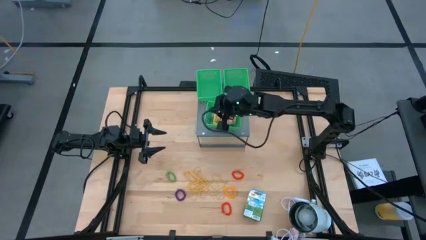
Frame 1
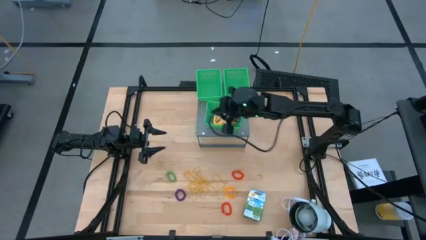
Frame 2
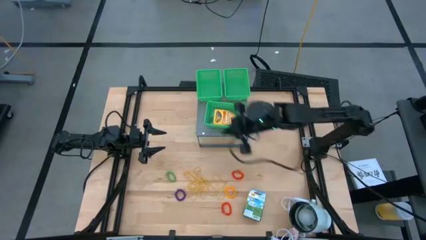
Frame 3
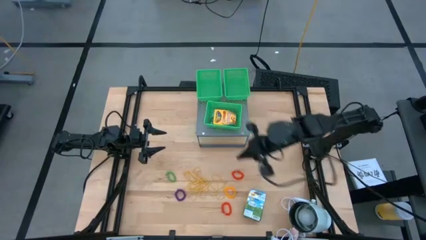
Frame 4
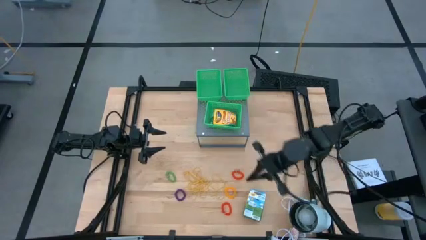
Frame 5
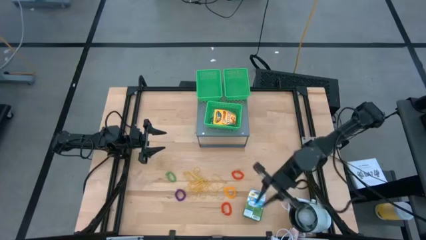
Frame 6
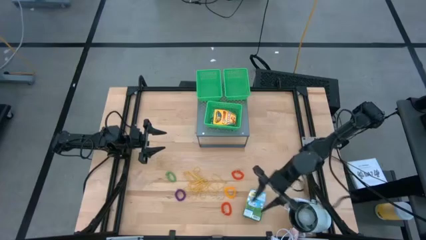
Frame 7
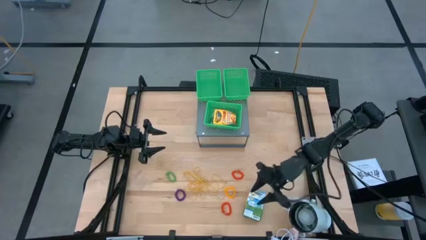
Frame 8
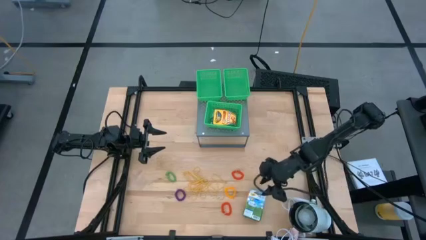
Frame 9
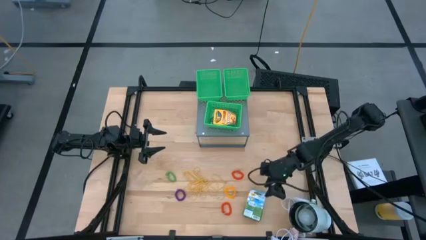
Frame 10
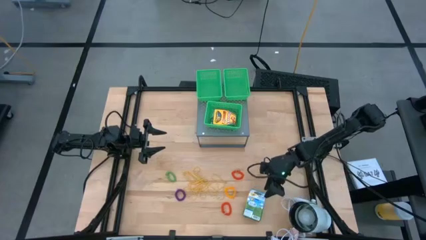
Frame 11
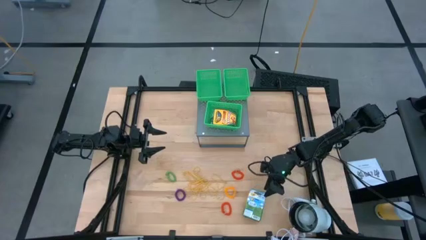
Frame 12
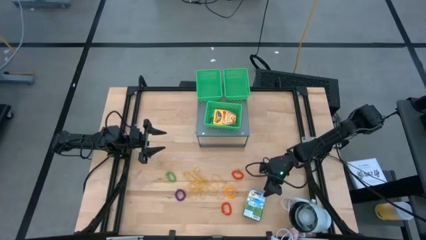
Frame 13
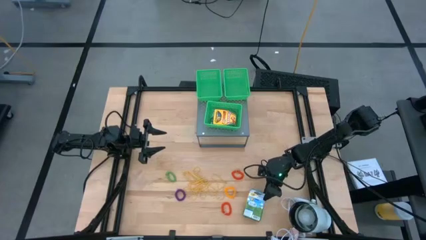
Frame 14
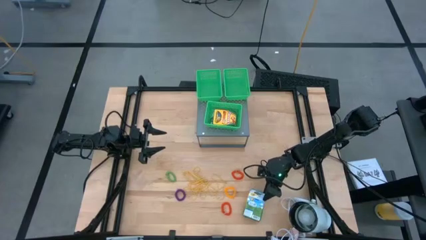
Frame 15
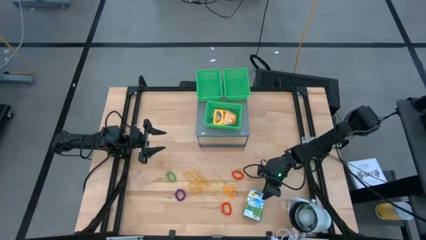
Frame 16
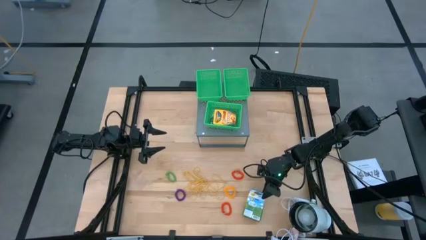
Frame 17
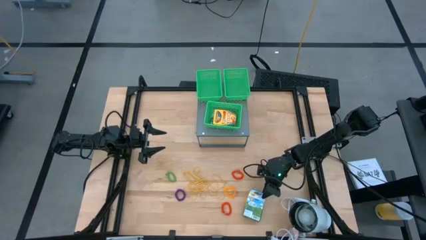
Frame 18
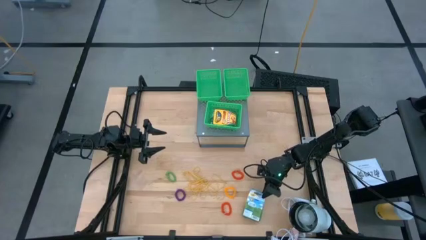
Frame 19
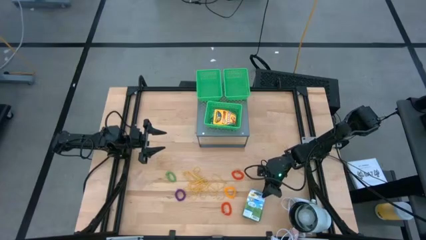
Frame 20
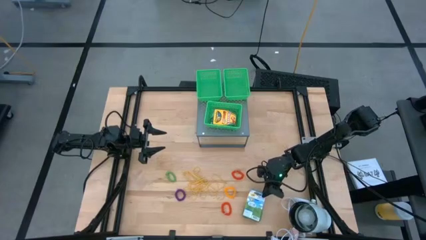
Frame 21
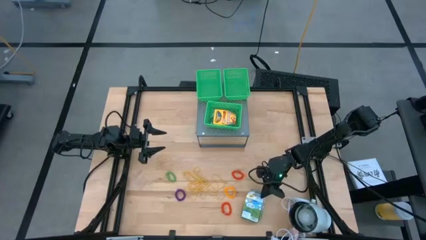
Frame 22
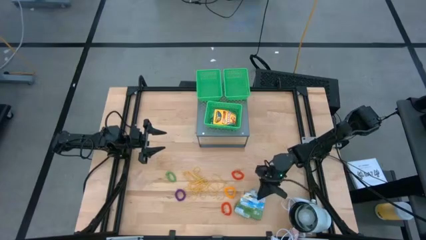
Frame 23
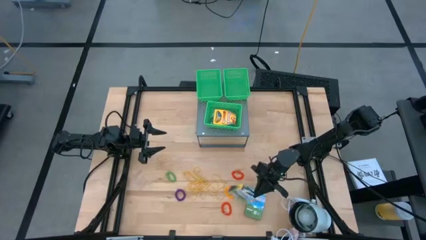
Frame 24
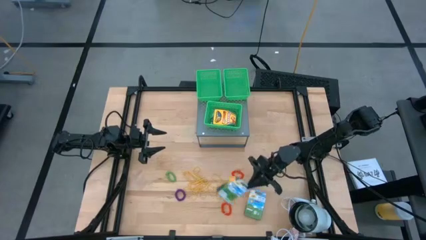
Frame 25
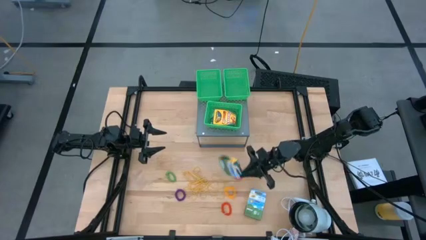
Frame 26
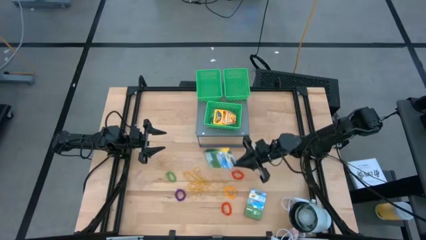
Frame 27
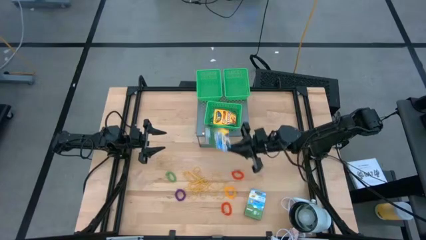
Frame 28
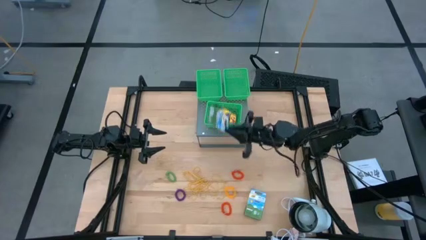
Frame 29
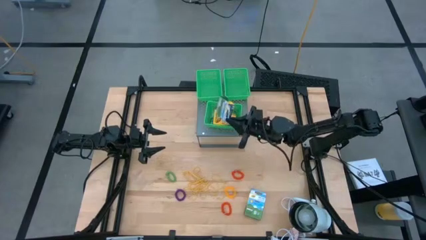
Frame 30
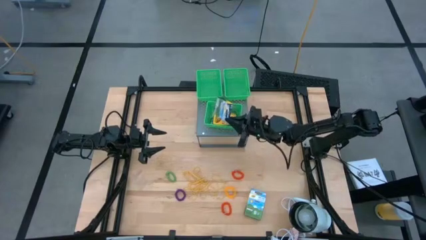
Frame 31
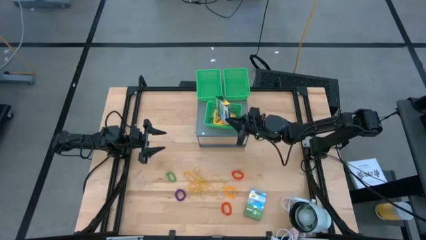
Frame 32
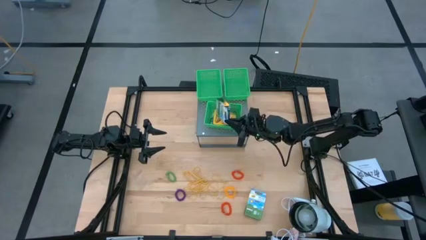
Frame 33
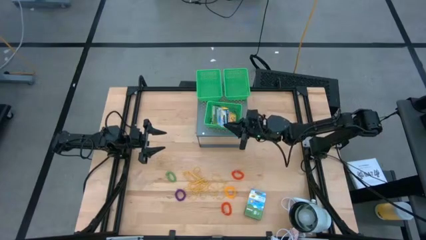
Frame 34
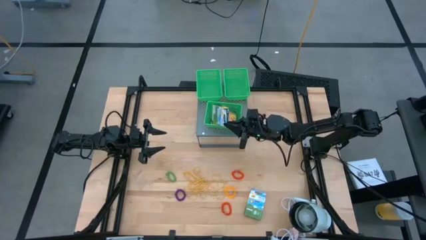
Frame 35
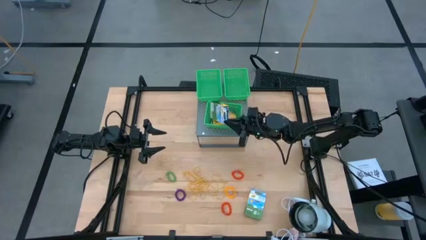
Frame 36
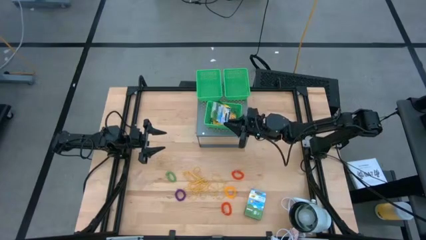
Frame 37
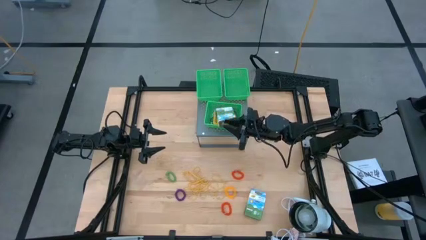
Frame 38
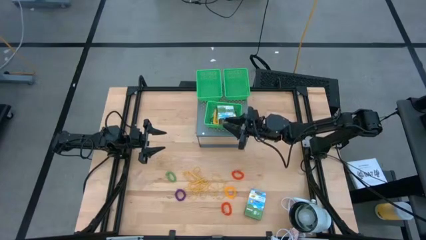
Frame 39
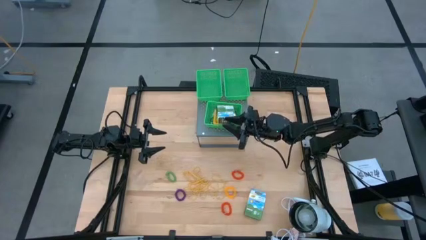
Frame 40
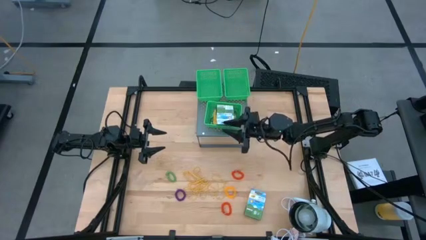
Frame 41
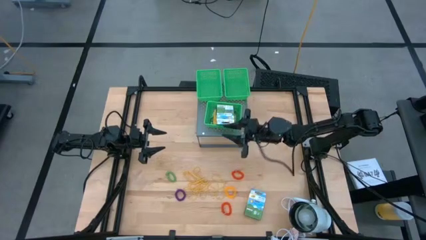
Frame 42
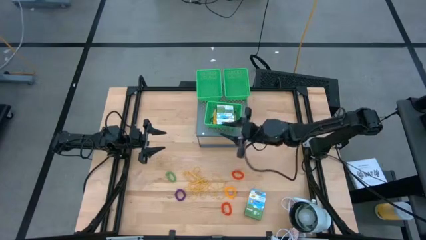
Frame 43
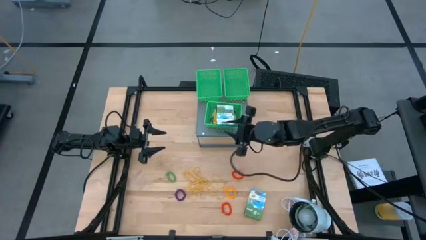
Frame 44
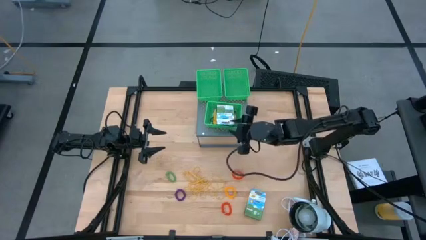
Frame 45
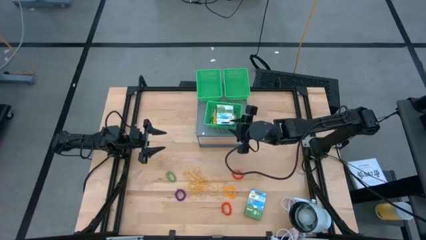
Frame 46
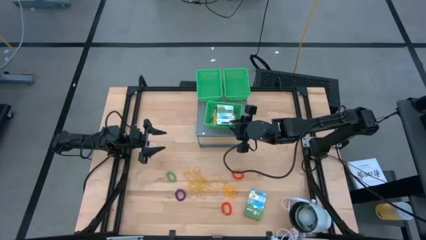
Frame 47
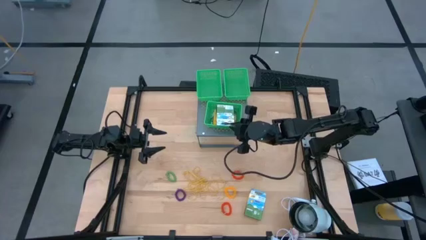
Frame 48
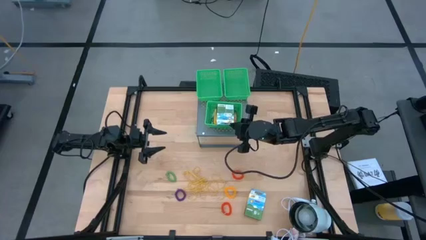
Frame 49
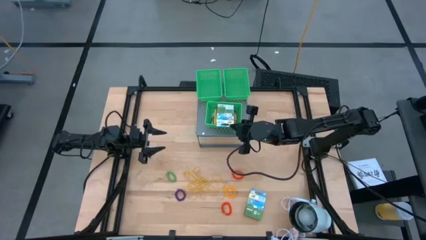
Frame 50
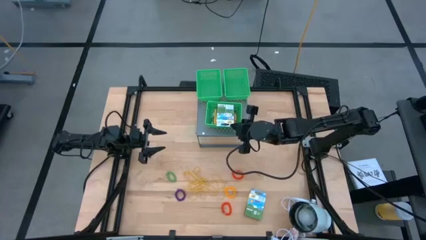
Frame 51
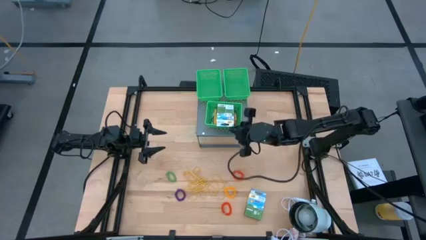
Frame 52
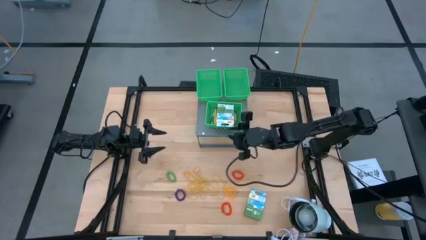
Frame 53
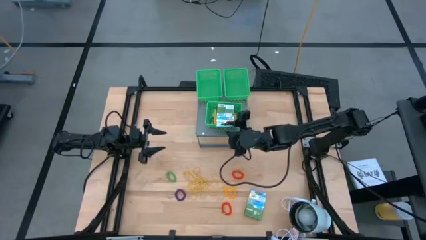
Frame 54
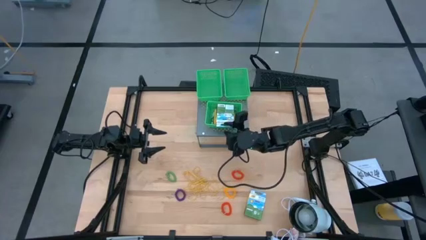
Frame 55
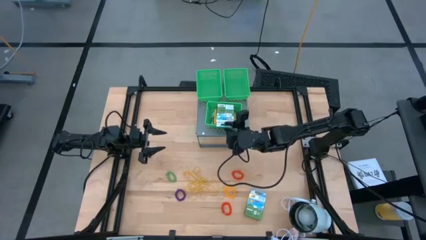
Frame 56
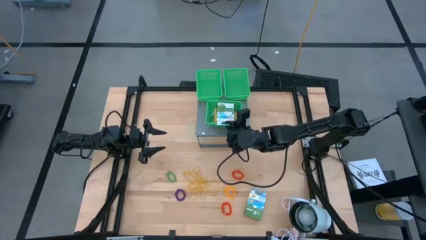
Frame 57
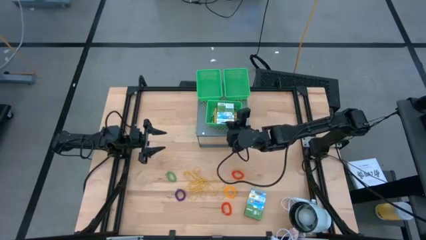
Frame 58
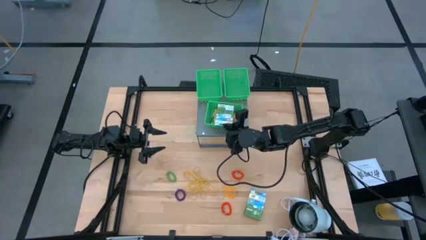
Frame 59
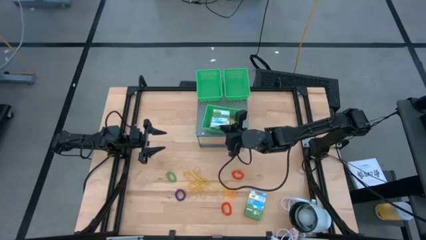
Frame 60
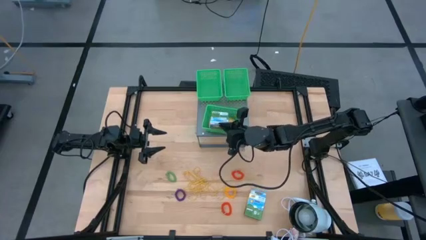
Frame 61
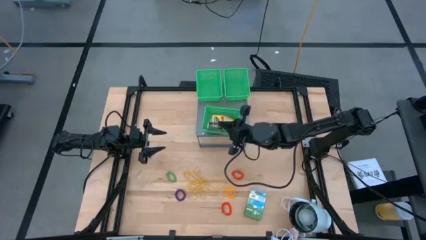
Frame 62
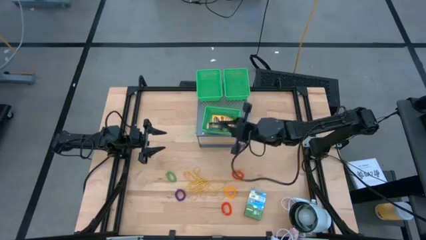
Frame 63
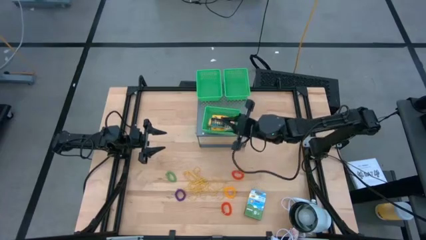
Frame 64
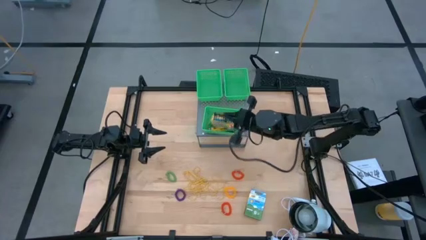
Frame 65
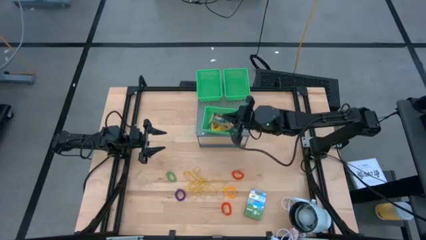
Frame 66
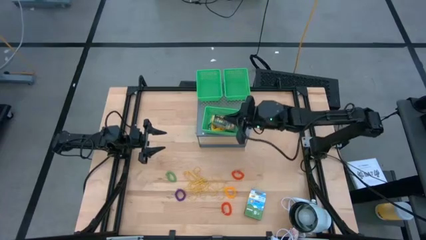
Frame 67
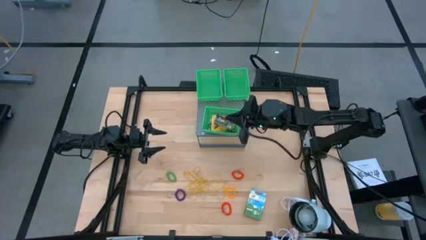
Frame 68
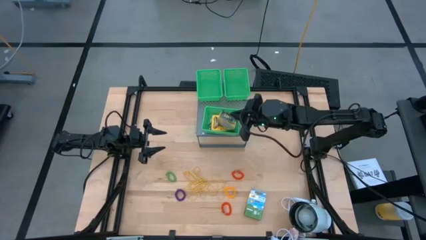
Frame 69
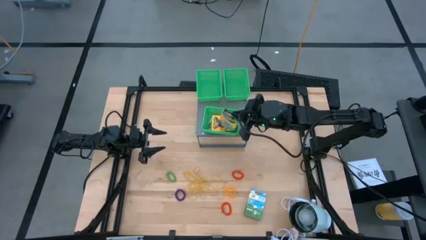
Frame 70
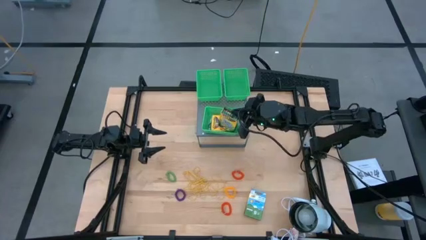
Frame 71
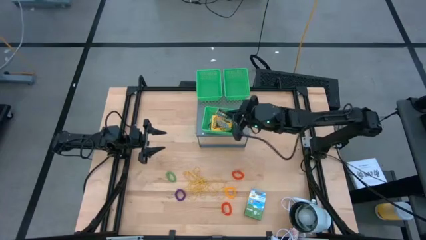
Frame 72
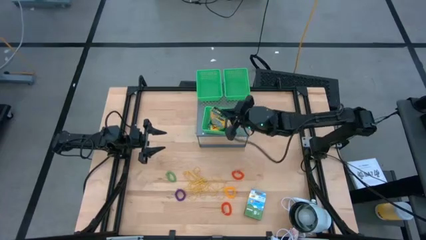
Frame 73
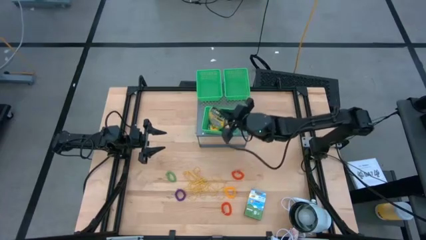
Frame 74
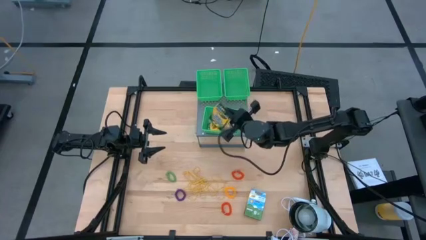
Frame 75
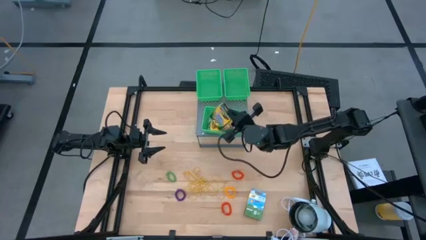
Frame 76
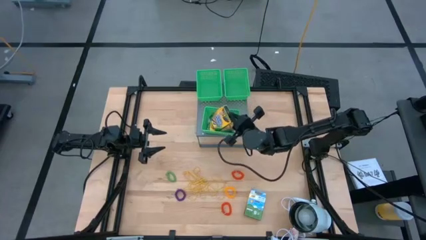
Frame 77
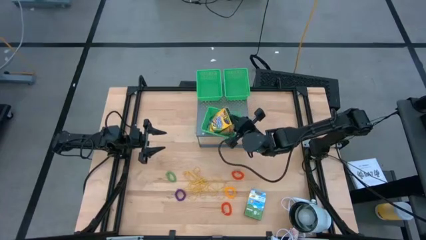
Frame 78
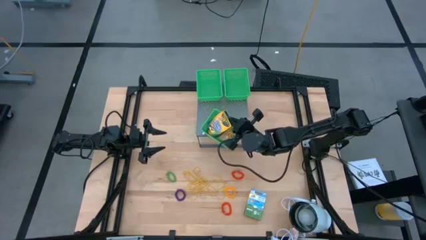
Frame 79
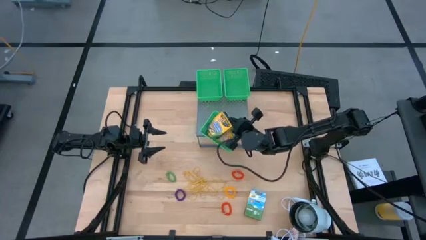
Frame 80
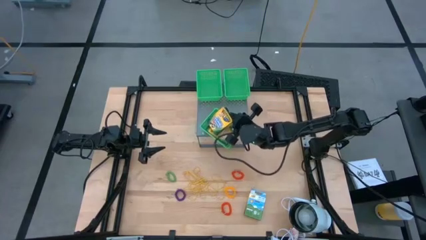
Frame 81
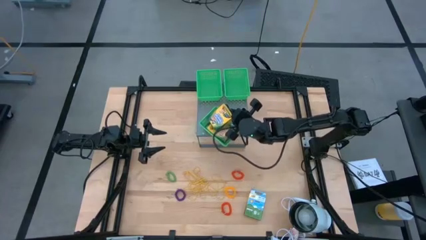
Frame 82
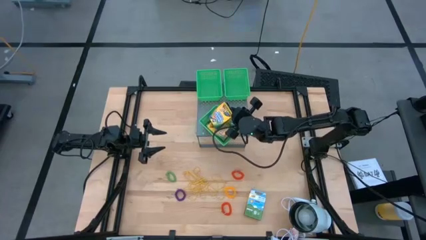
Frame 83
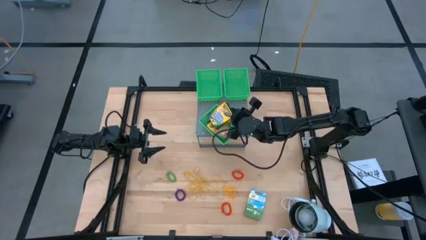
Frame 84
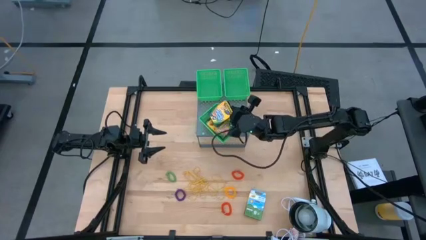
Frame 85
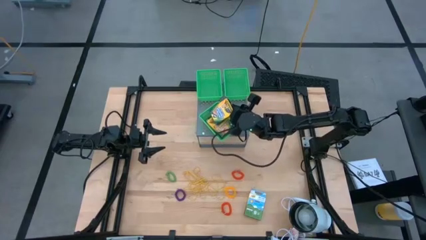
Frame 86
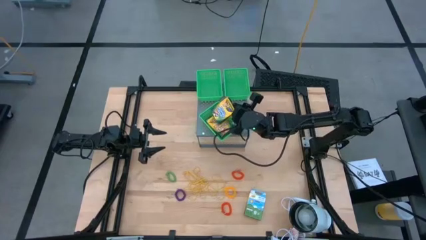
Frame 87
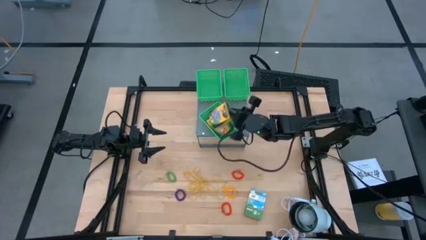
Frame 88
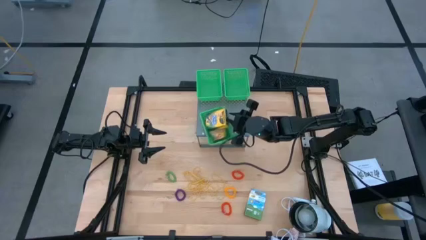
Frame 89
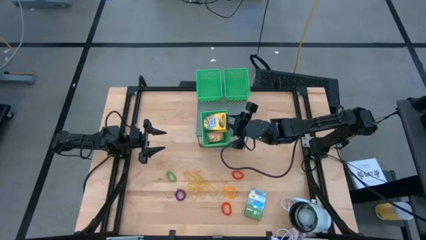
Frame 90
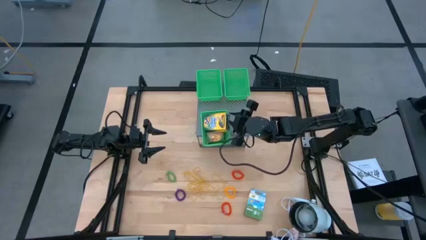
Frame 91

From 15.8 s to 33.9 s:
Task: Pick & Place Office Desk Supplies
Put the crayon box into the bottom green bin on the shelf
